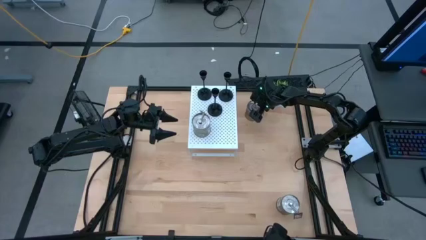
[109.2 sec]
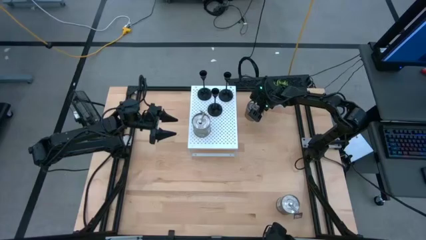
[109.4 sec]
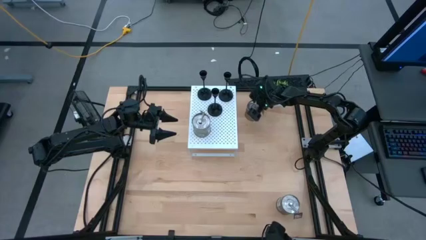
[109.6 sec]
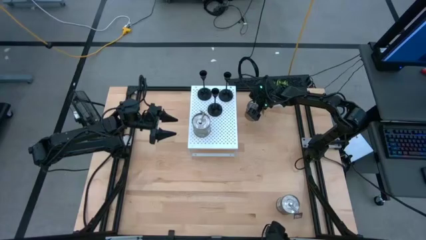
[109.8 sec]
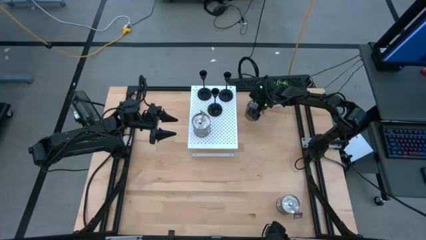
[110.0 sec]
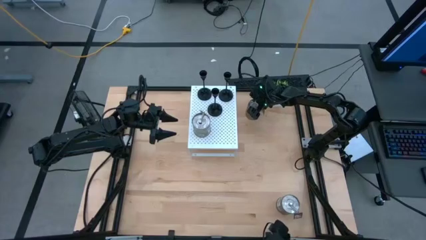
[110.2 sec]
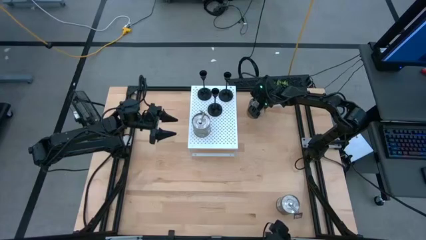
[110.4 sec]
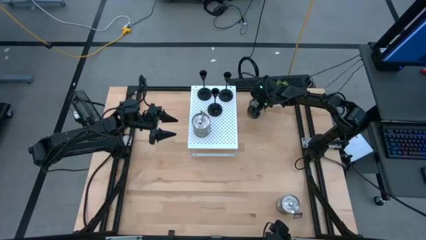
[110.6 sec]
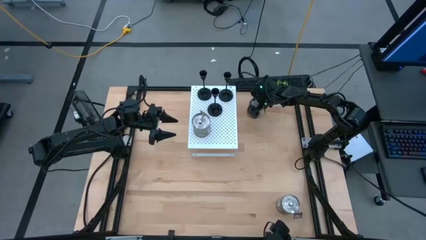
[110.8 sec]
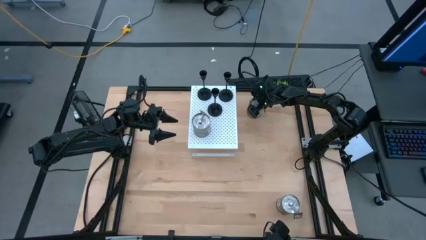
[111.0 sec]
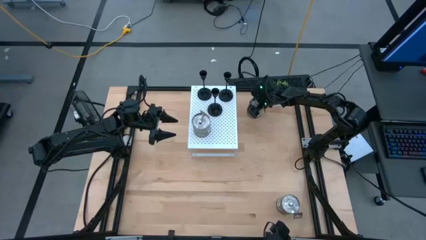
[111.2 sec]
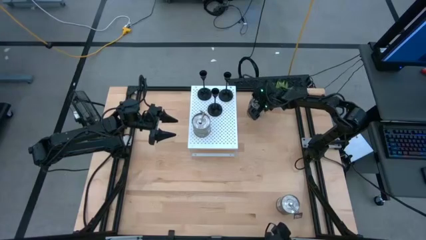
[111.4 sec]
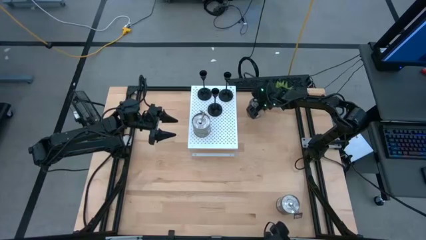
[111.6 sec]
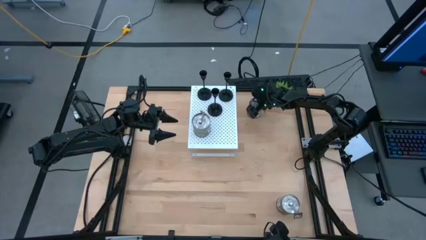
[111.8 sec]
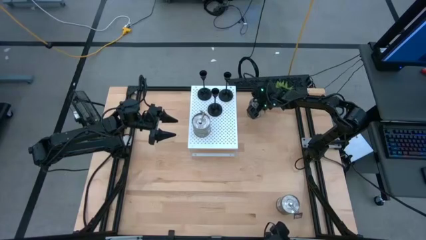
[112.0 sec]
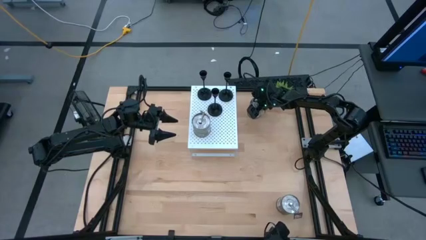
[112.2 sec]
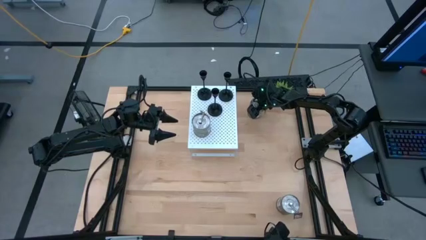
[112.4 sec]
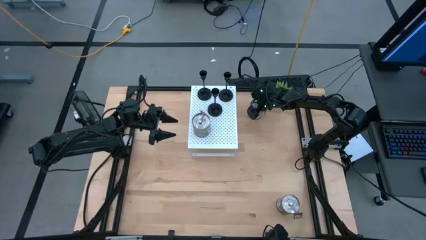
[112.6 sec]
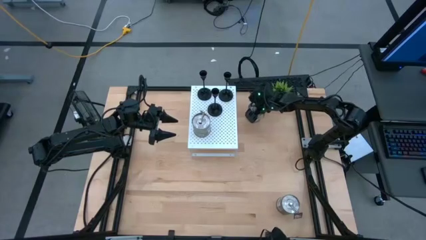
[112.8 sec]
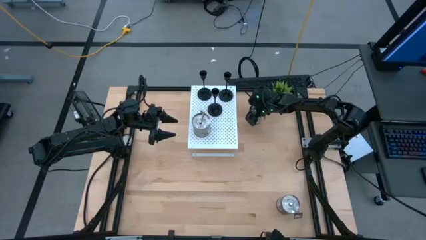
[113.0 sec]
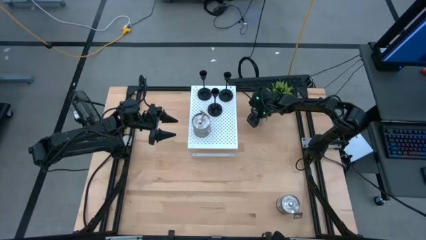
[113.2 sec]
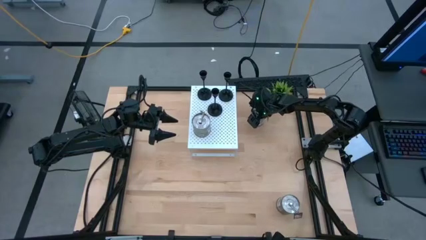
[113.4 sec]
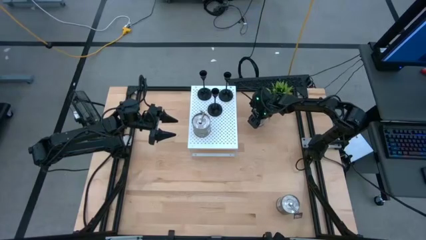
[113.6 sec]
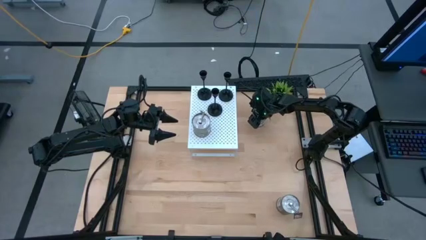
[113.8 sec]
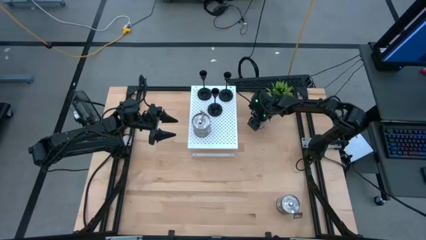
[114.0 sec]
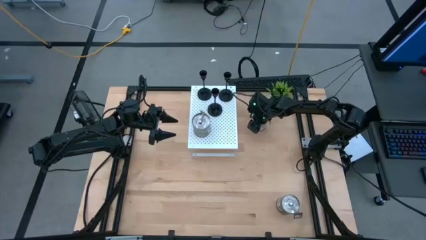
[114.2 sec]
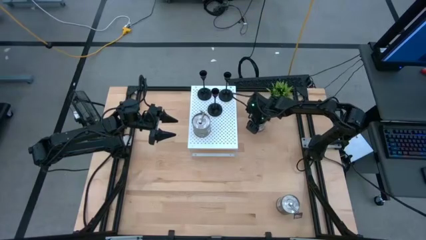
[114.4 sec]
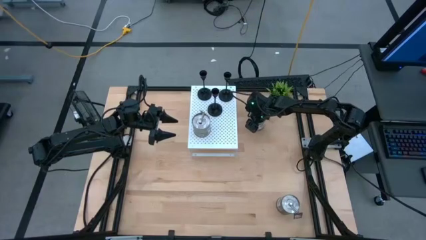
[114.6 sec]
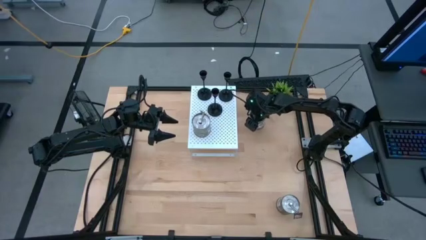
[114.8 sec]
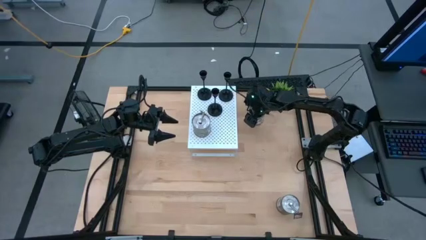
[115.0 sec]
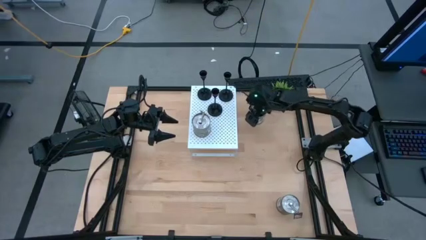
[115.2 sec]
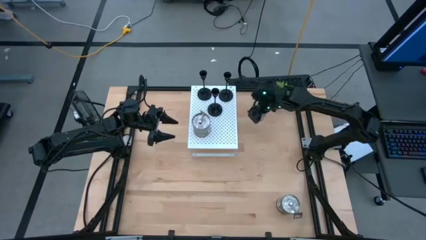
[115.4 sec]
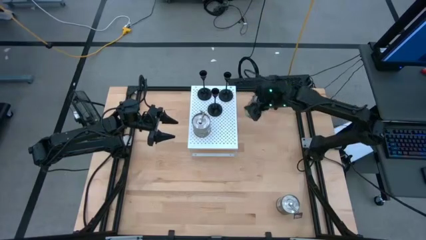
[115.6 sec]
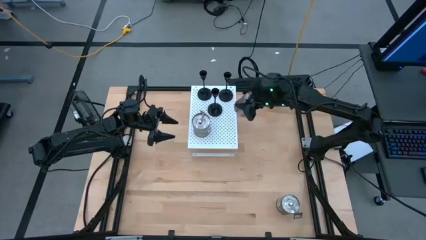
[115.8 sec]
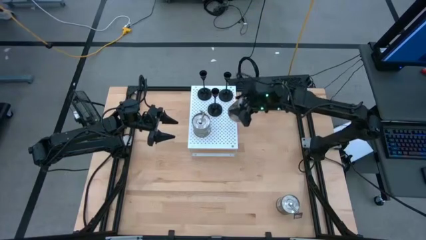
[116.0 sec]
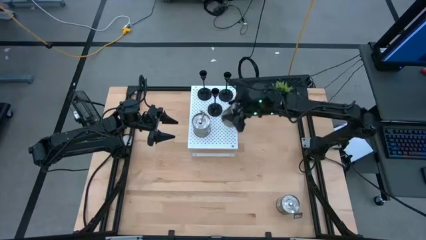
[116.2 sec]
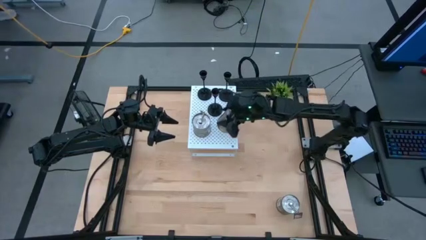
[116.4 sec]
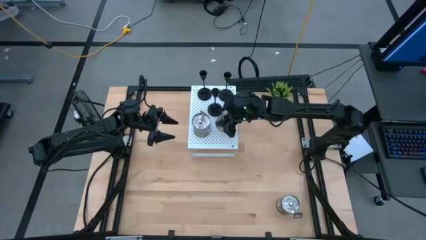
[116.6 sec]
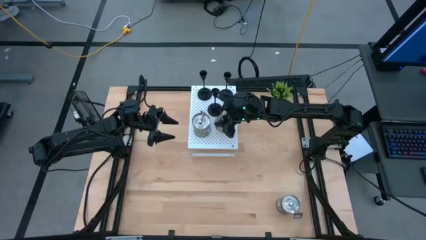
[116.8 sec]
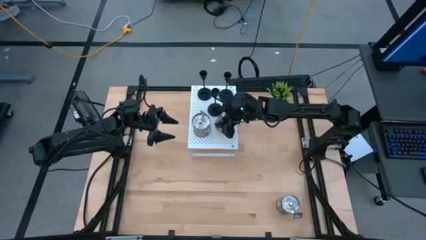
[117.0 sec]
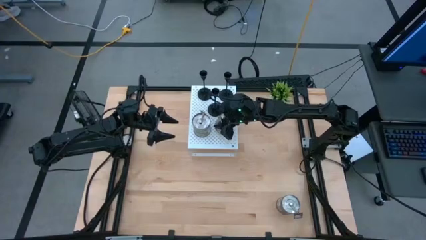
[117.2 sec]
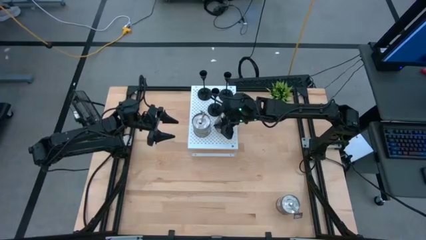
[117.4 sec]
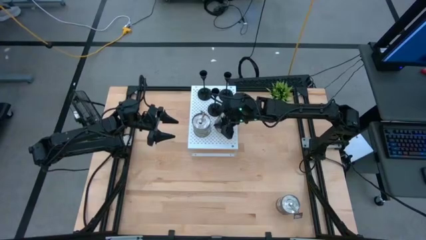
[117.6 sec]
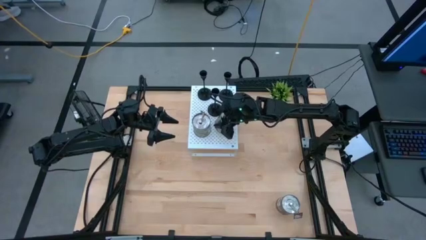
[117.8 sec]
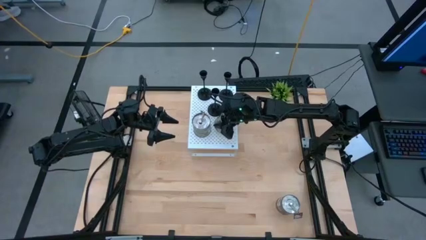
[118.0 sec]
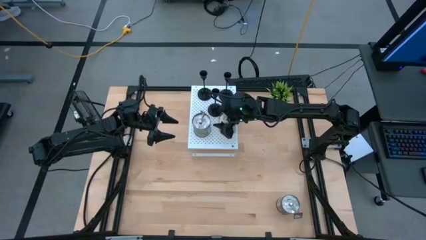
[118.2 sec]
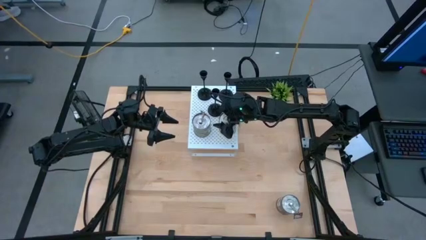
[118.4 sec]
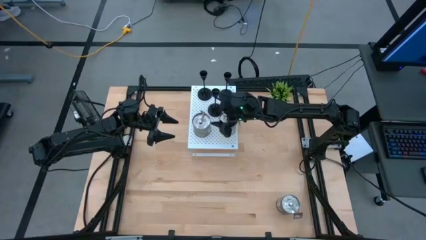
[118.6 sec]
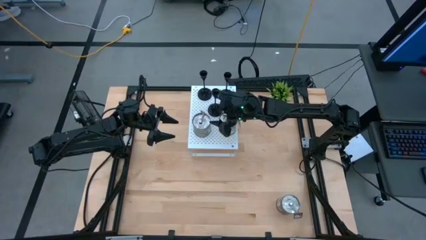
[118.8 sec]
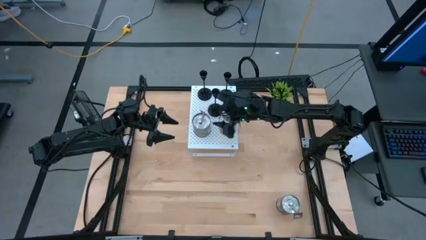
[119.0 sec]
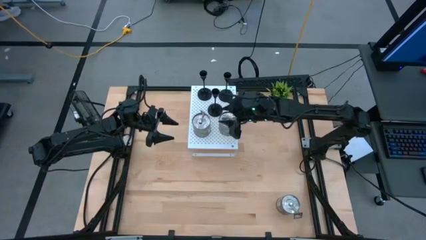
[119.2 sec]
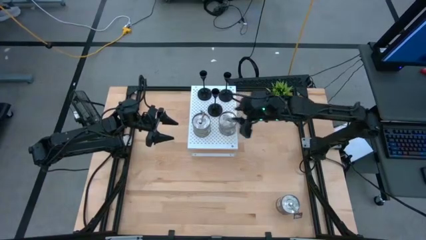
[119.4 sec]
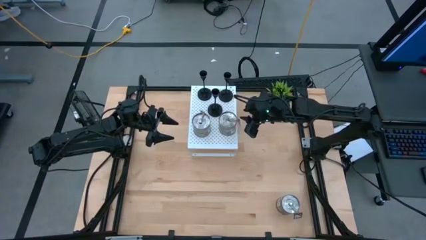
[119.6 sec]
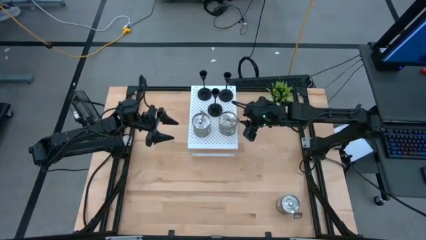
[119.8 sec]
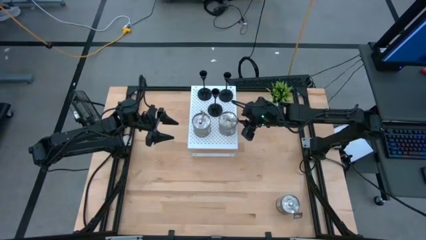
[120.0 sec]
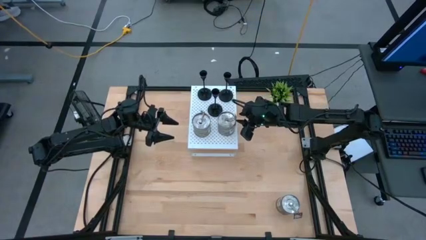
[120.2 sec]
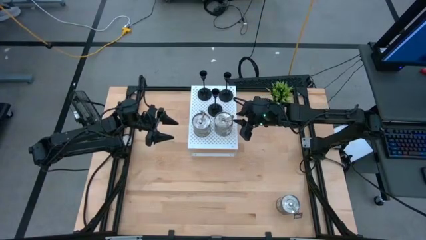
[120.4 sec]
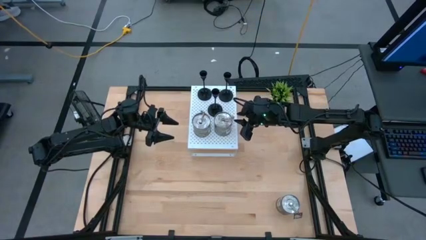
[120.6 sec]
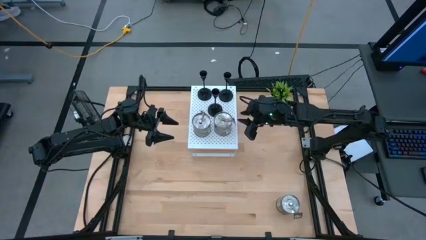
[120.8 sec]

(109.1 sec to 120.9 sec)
Task: Pick & Place candle stick holders
Put the top brown scented candle on the shelf
